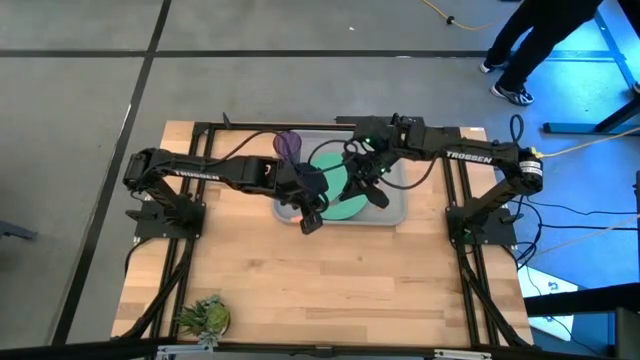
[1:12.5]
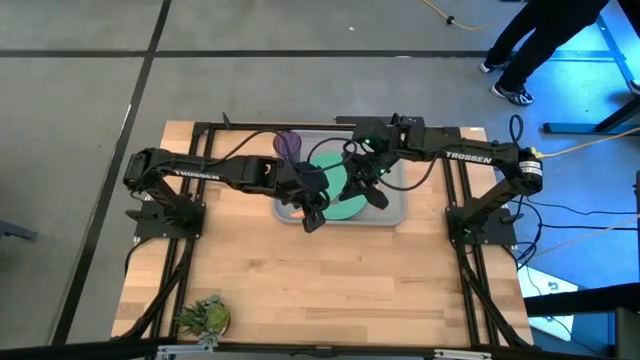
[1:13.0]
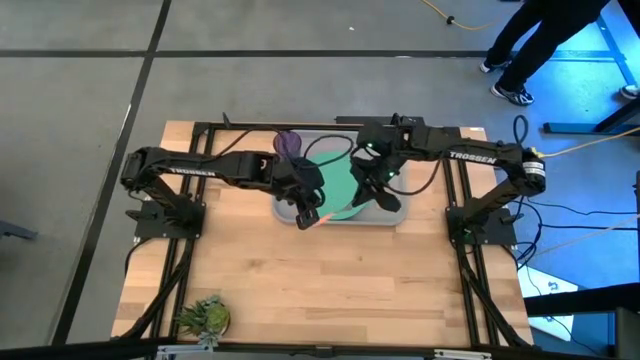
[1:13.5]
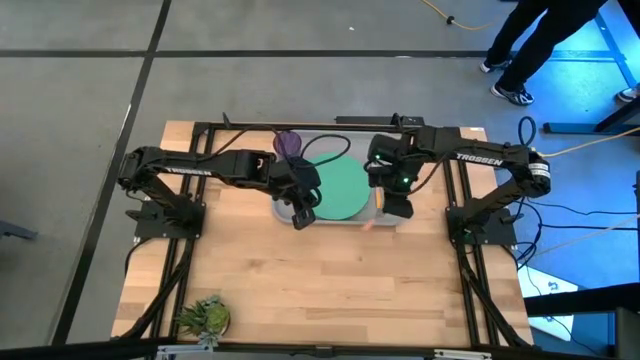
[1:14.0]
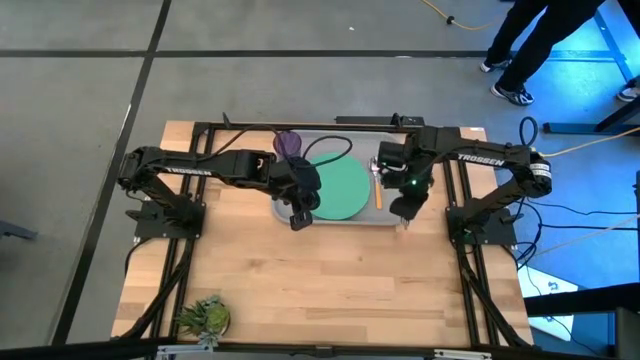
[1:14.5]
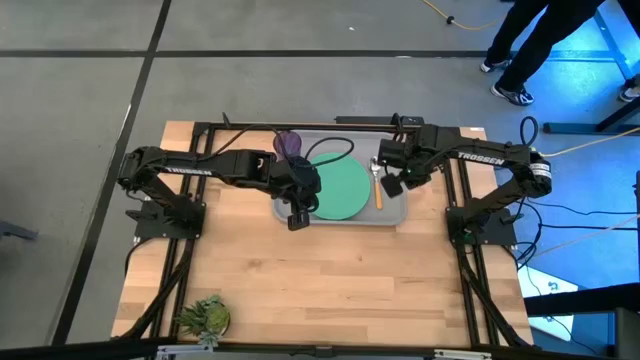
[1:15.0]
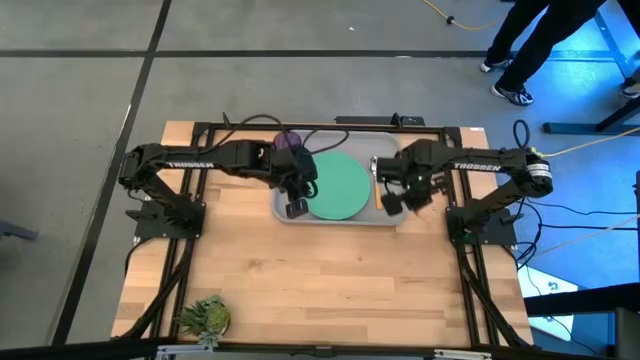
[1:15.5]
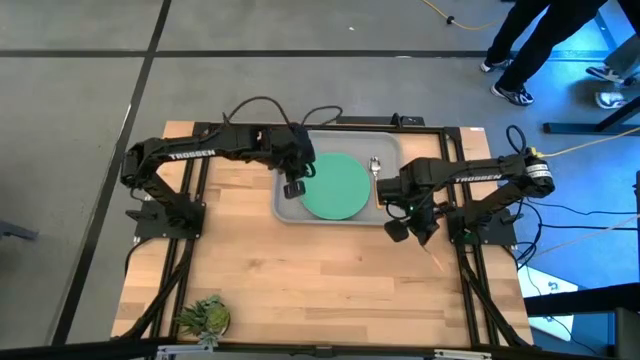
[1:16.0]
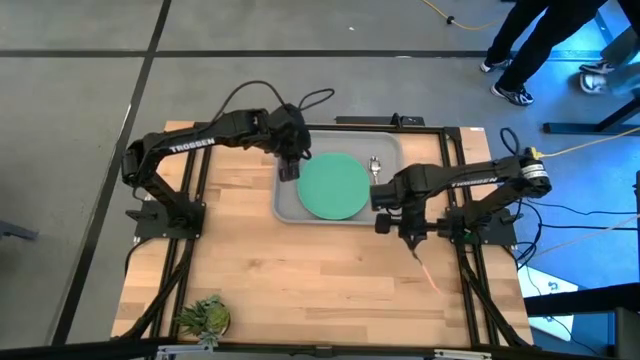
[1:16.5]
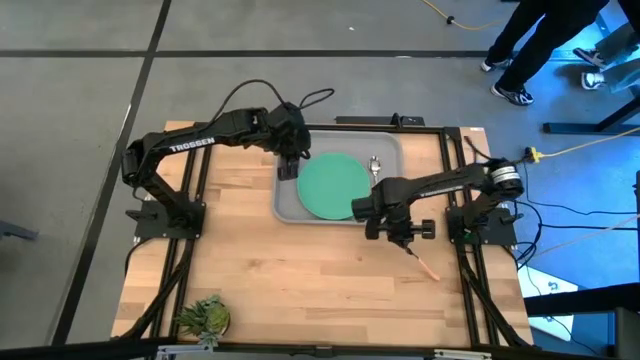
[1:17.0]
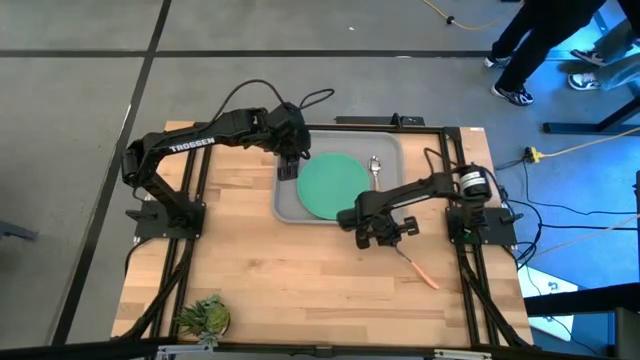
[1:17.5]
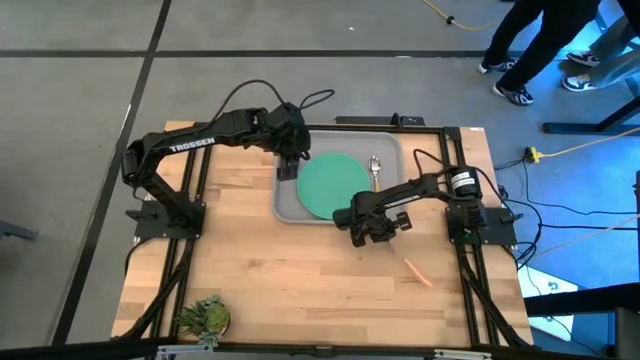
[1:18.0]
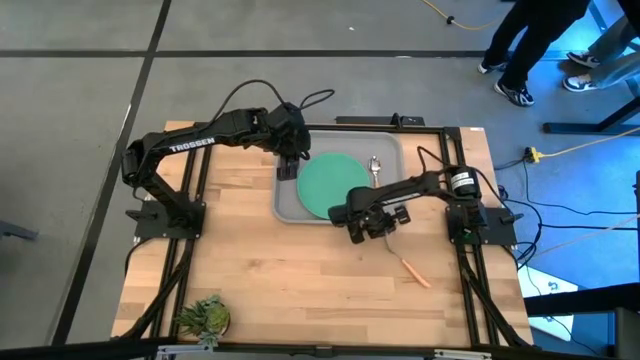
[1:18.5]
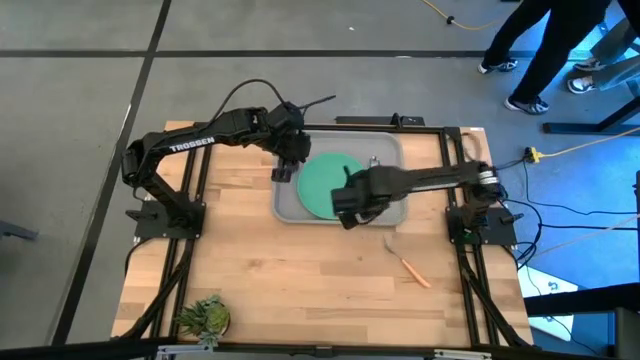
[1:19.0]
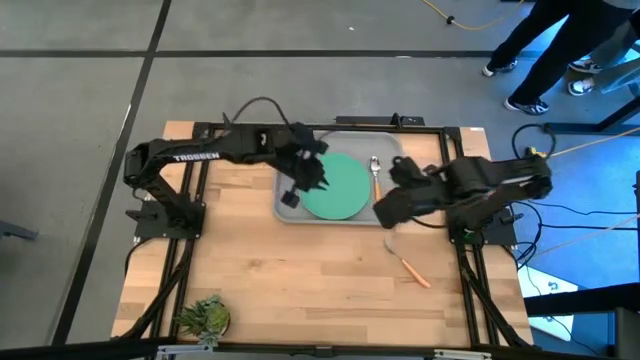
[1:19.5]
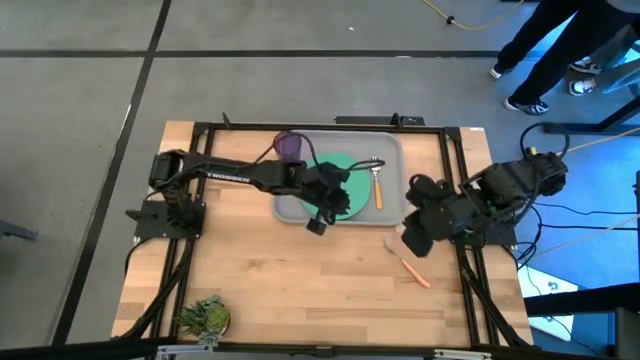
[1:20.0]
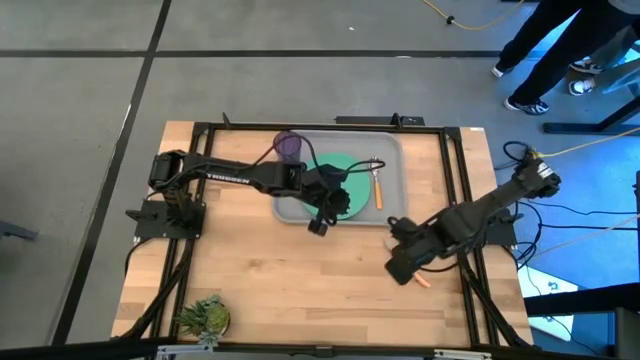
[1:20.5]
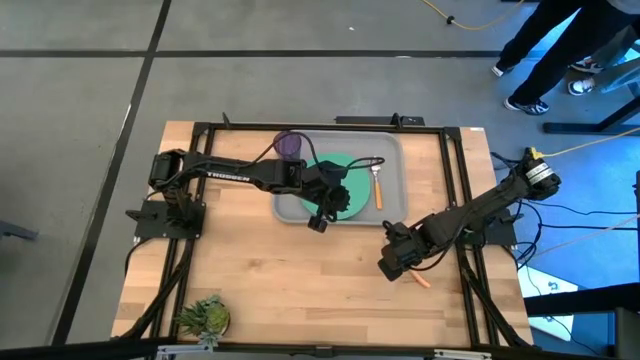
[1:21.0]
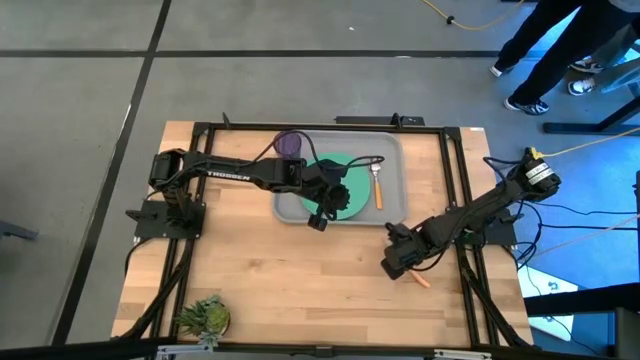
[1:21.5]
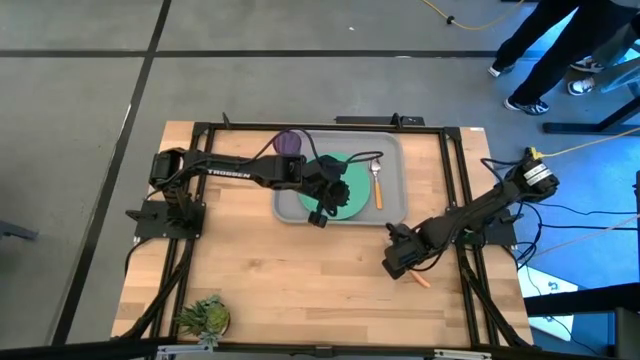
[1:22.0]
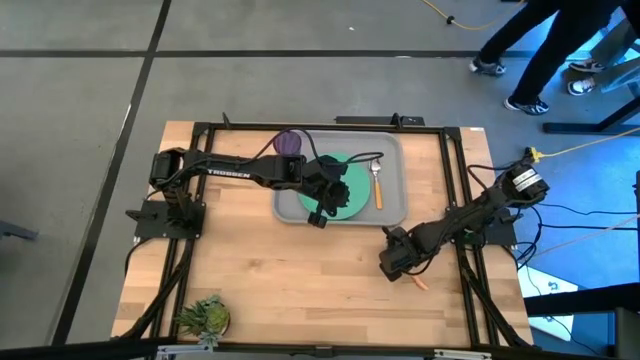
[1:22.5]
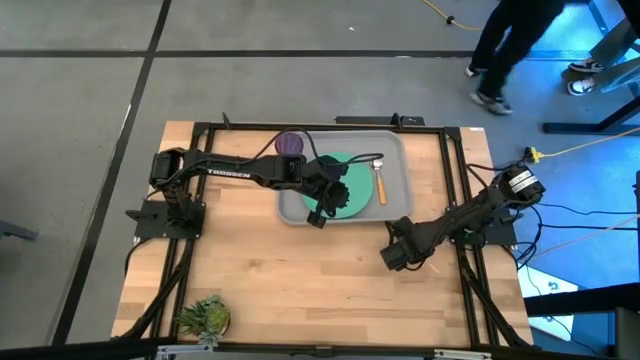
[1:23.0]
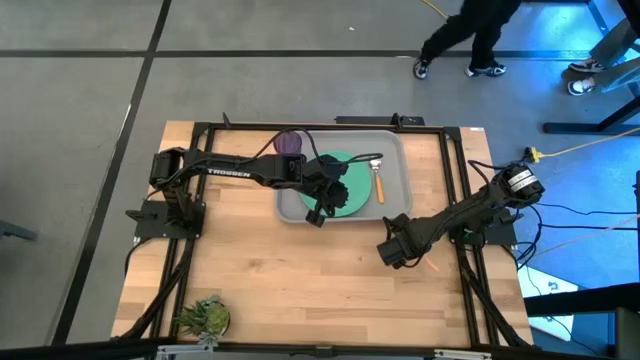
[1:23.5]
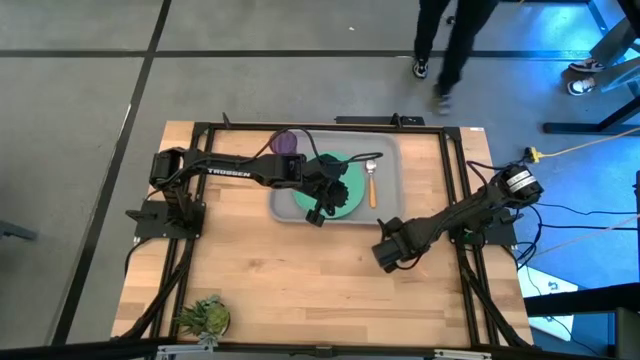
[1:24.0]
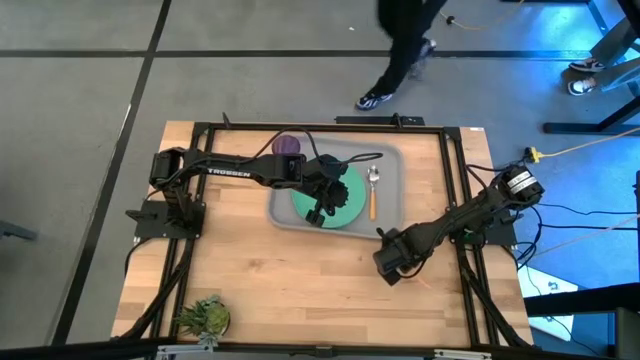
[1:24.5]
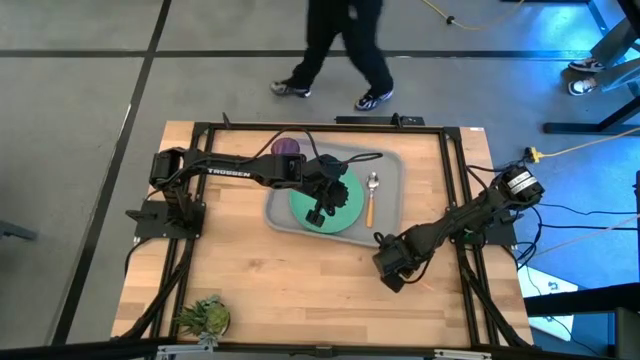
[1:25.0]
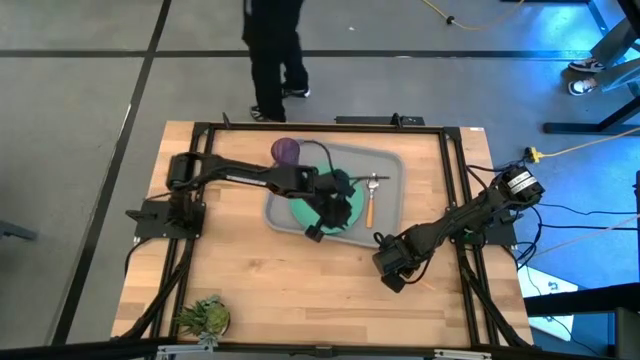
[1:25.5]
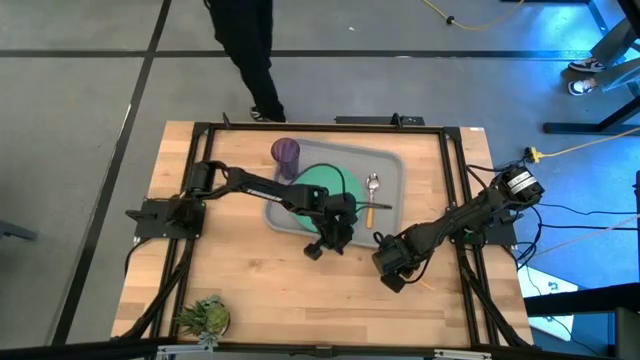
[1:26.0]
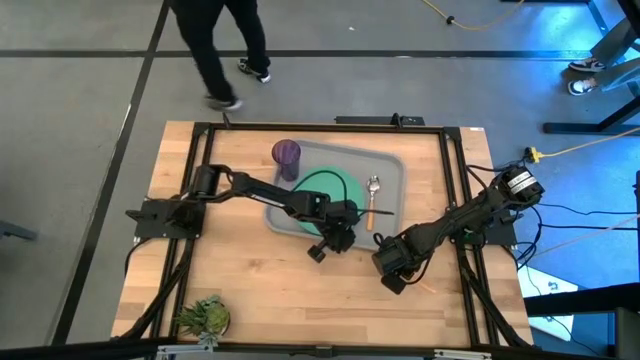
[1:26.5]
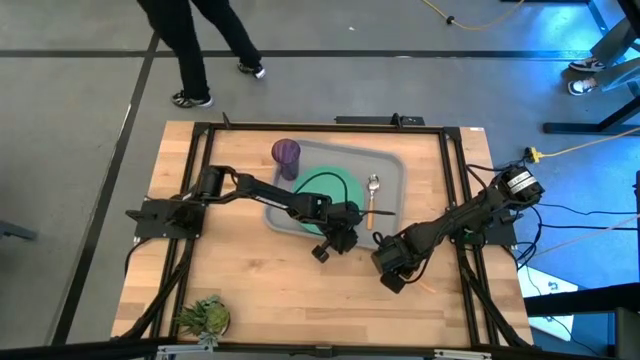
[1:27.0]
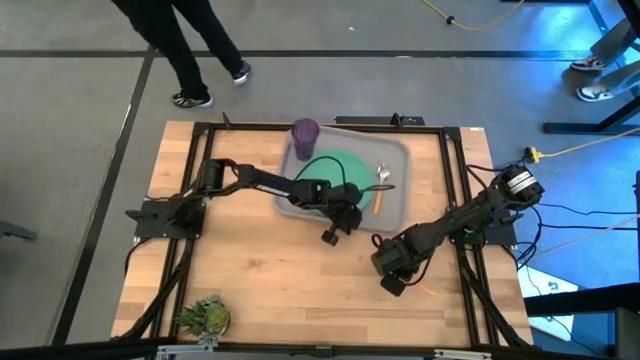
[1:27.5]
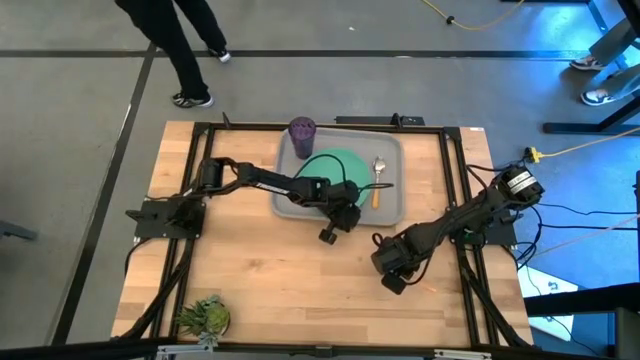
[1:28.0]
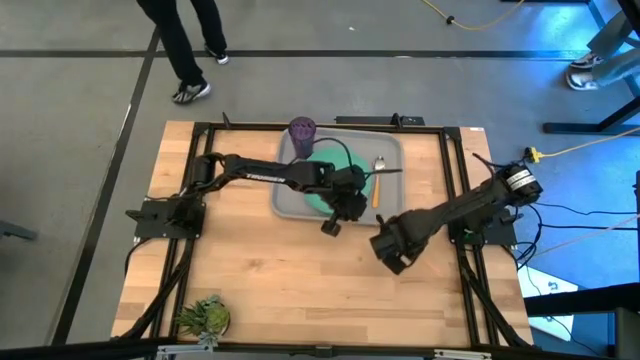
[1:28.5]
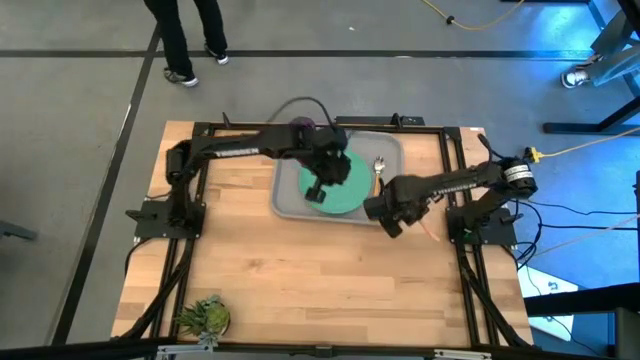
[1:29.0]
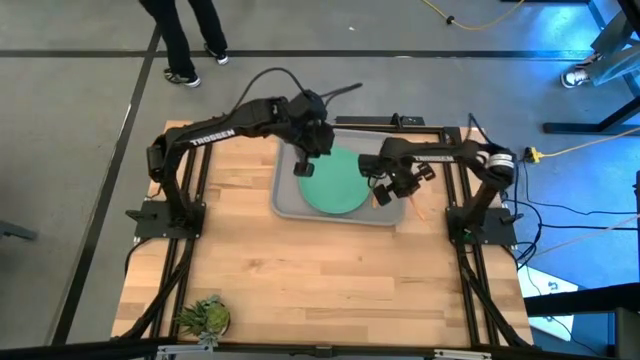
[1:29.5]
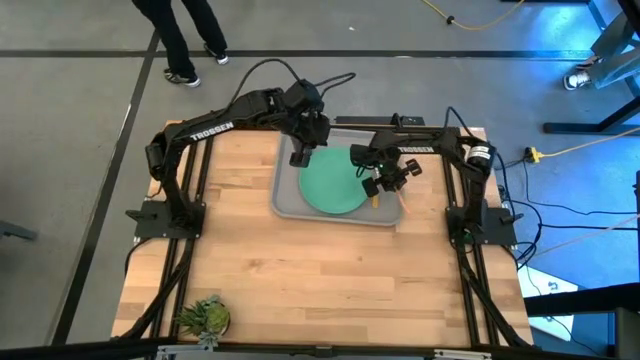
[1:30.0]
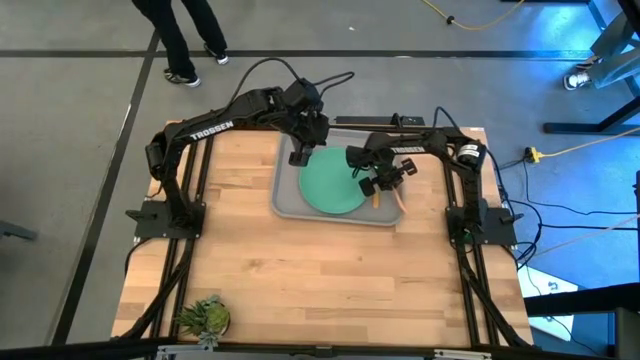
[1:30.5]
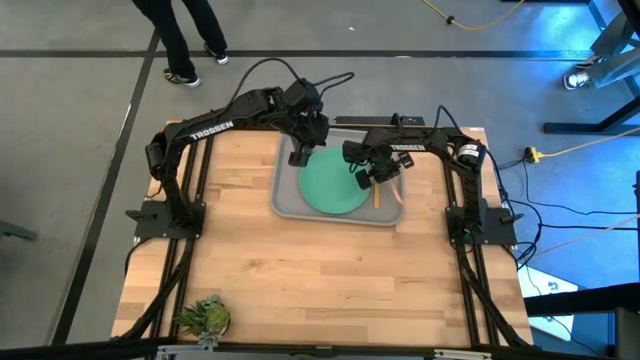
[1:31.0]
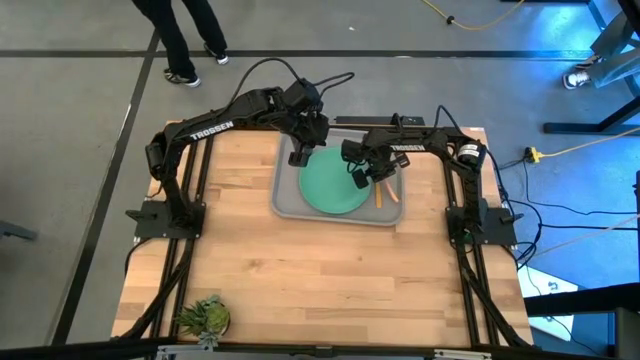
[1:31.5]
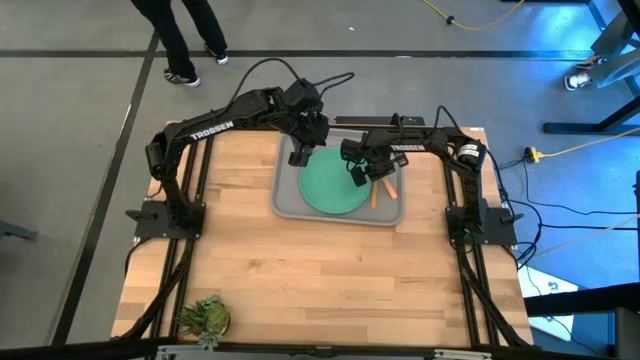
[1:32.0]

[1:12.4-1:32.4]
Task: Pick and place plate/cup/fork/spoon on tray
Put the yellow fork on the gray tray to the right of the yellow spoon

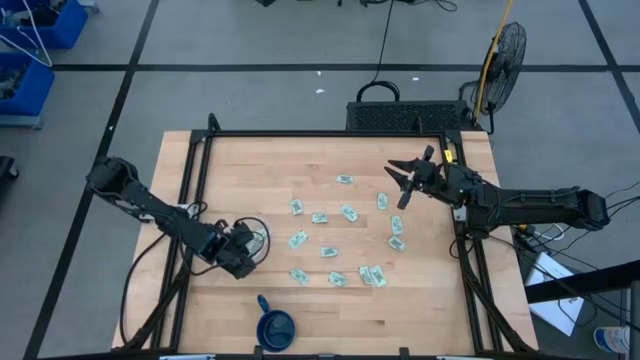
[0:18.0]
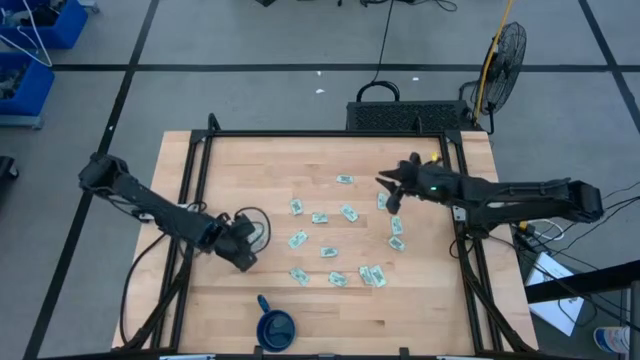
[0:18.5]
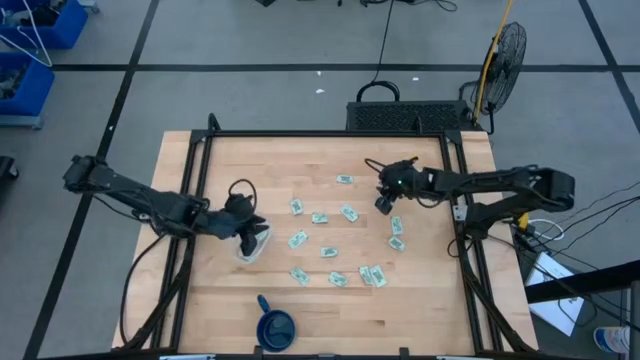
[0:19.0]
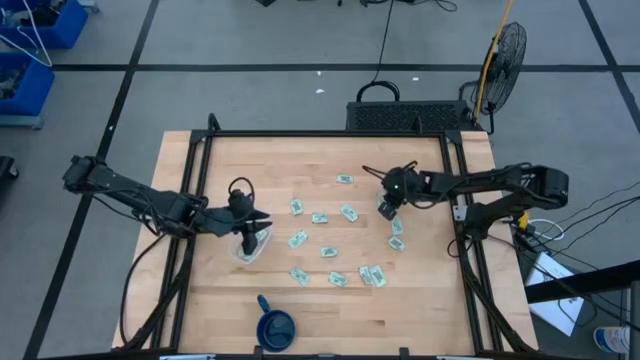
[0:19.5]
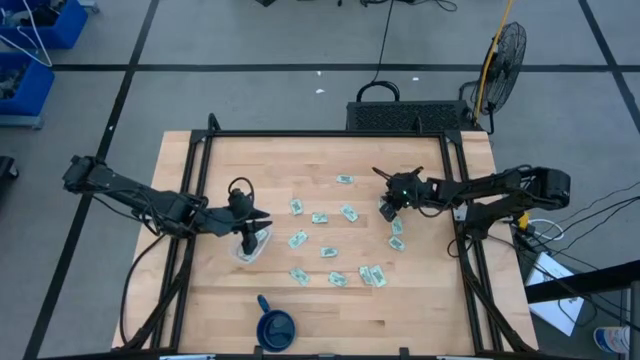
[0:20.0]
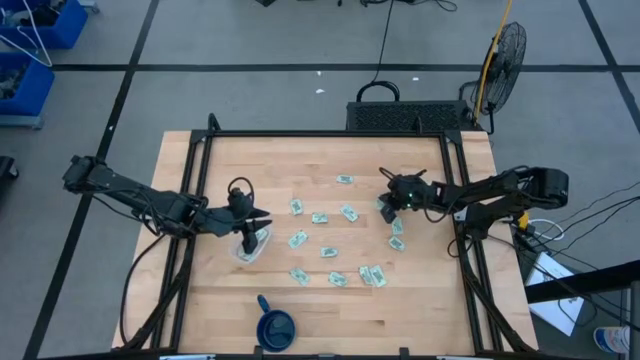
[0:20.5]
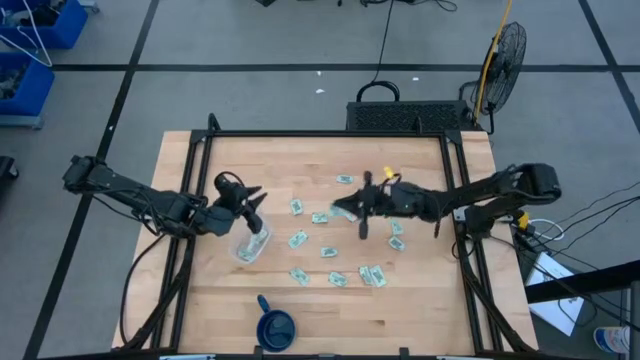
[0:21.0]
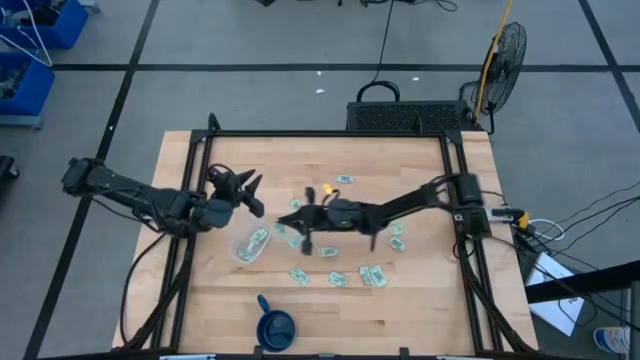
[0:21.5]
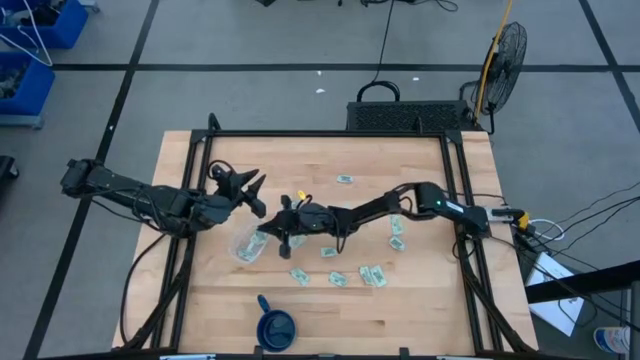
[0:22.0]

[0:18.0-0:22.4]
Task: Pick and place Stevia / Truvia into bins
Put the stevia packet into the transparent container
